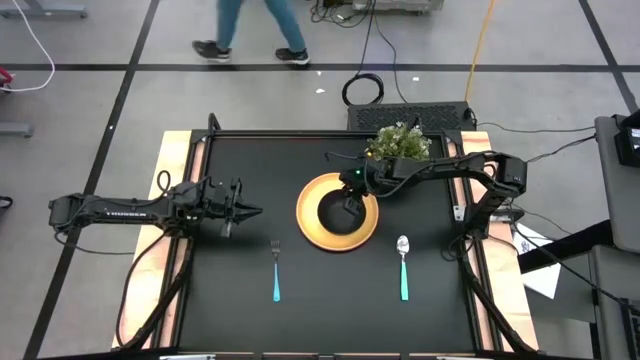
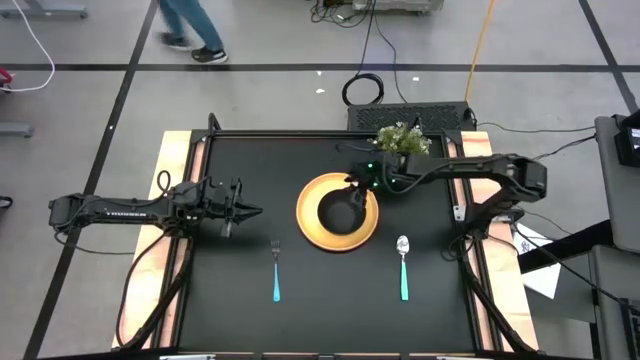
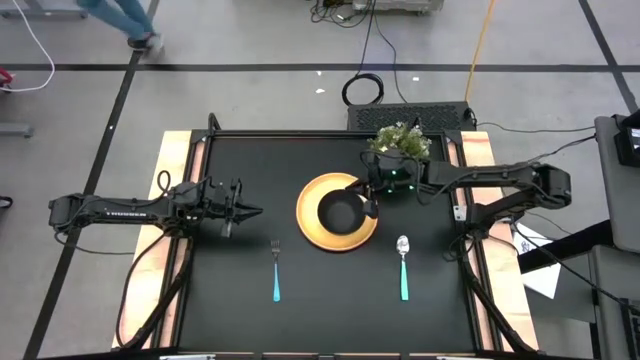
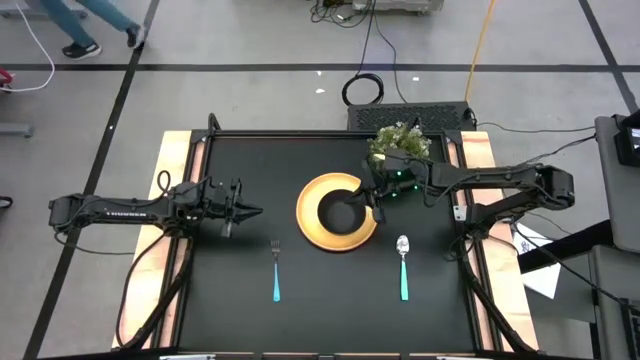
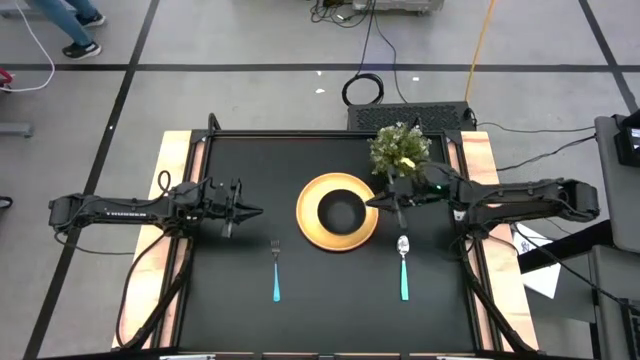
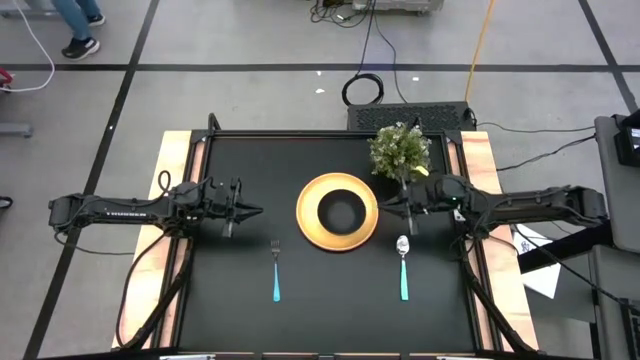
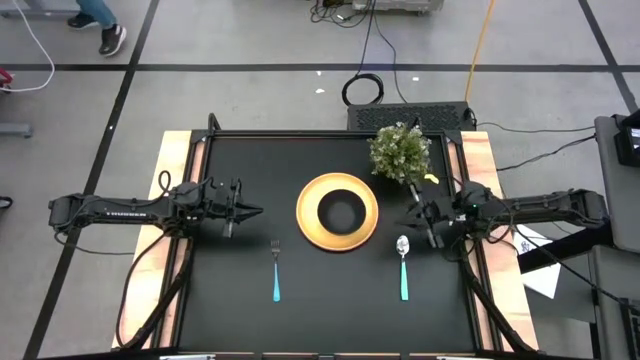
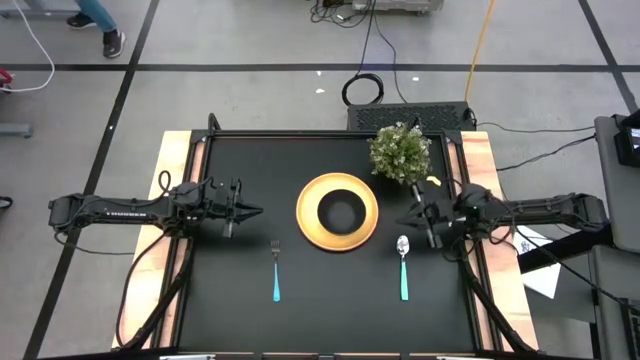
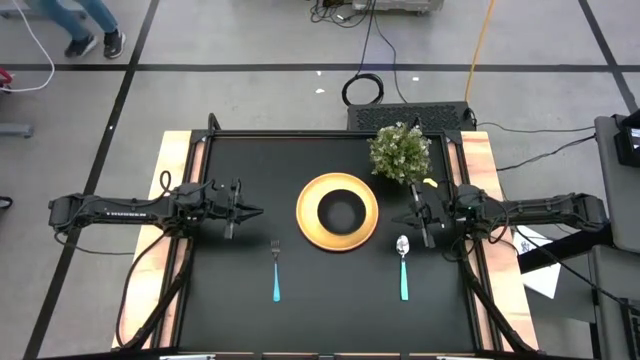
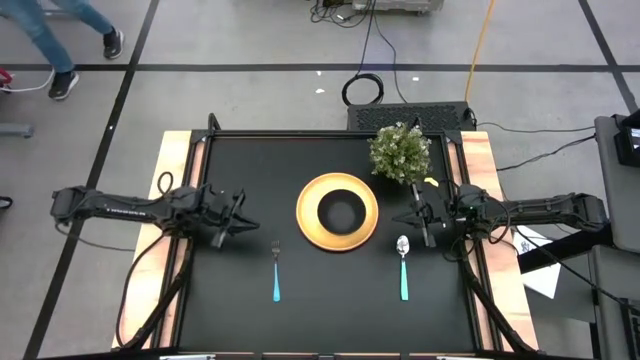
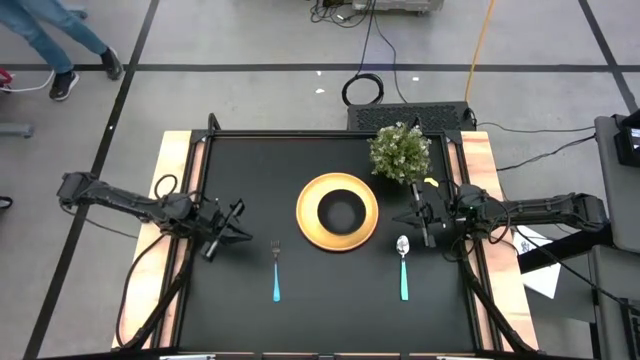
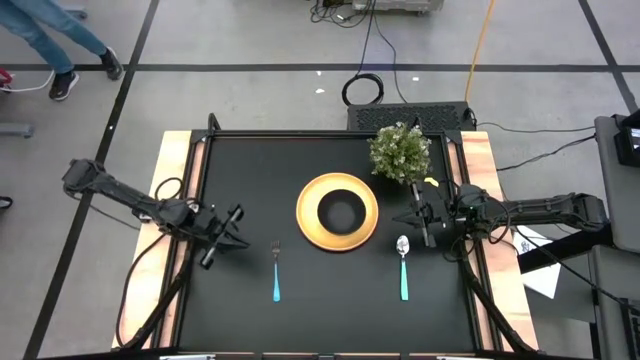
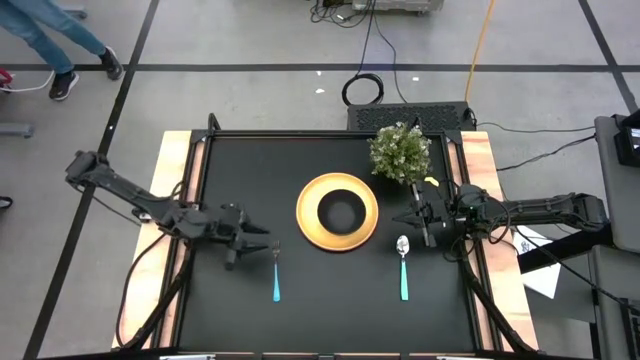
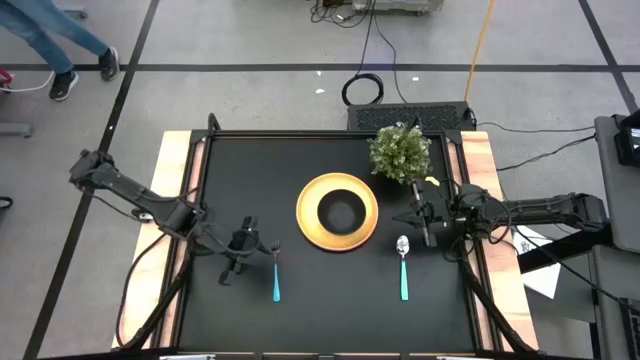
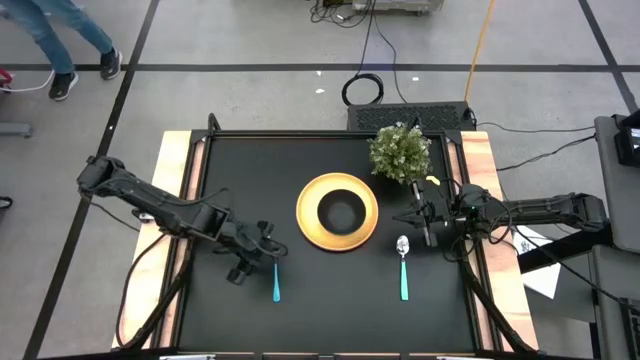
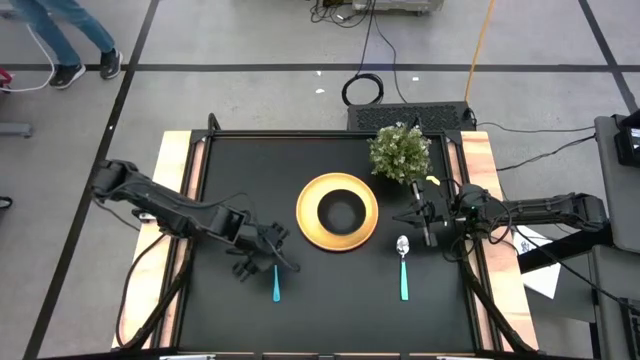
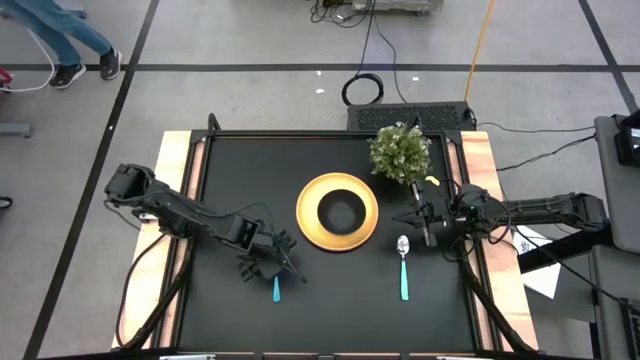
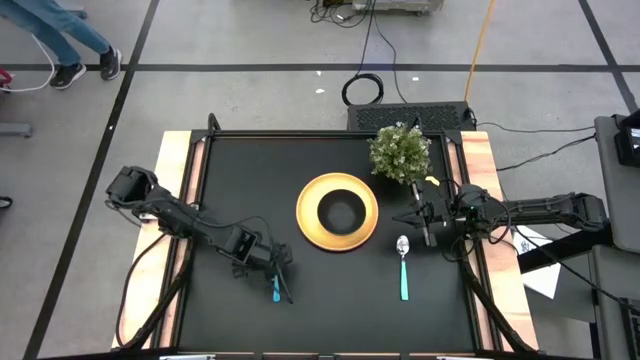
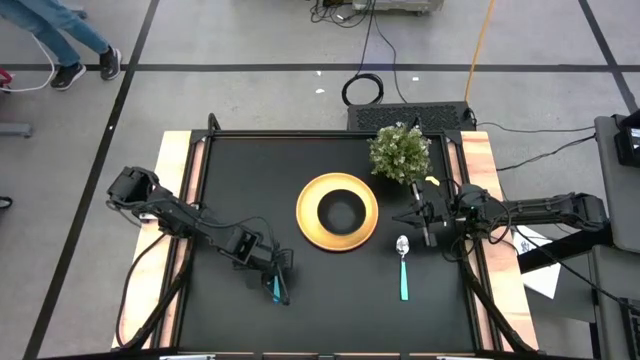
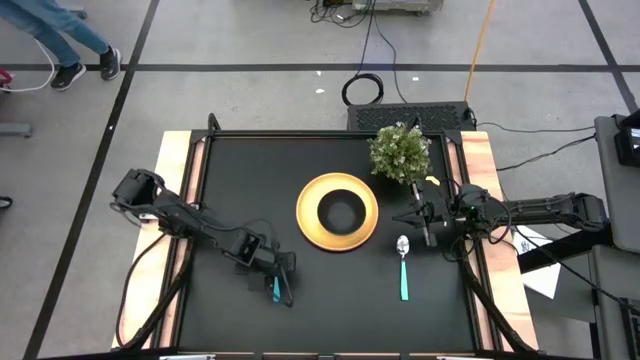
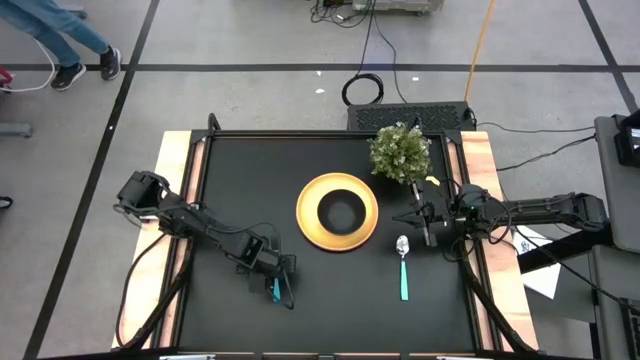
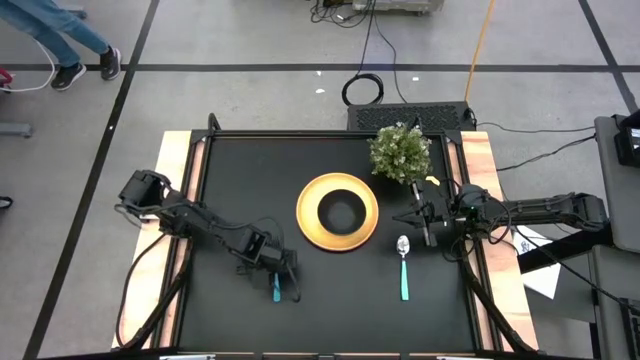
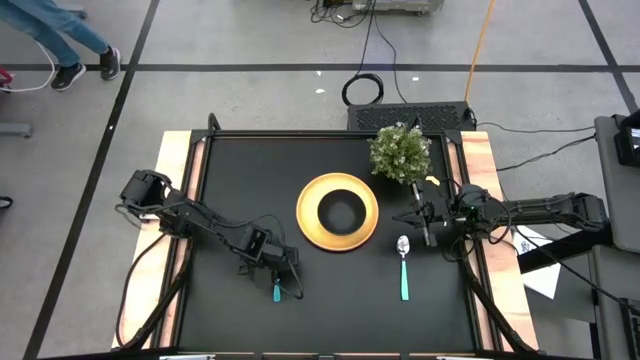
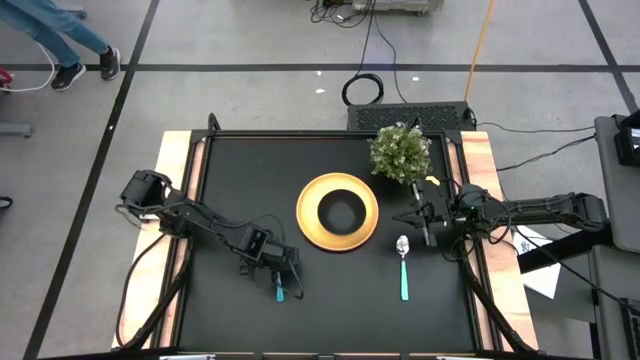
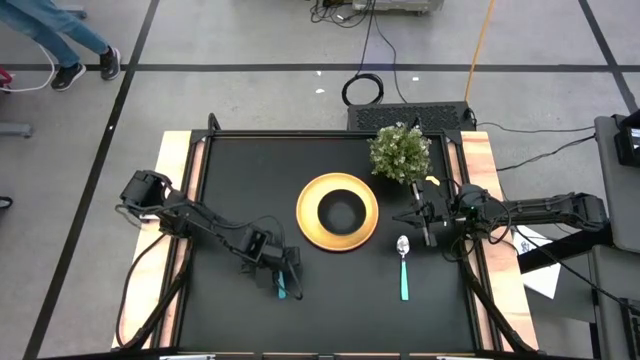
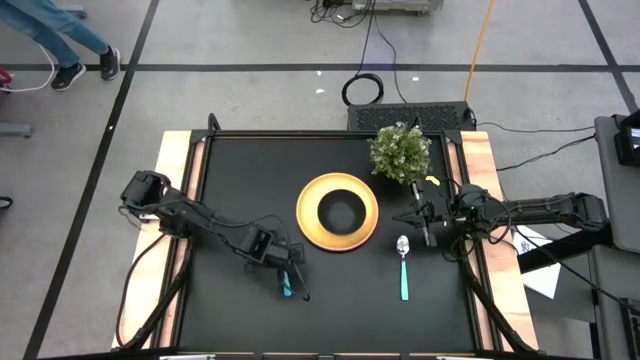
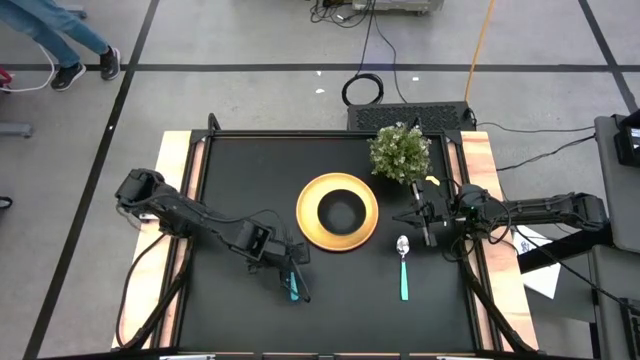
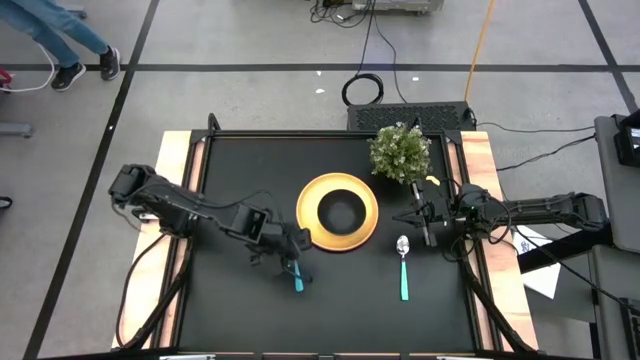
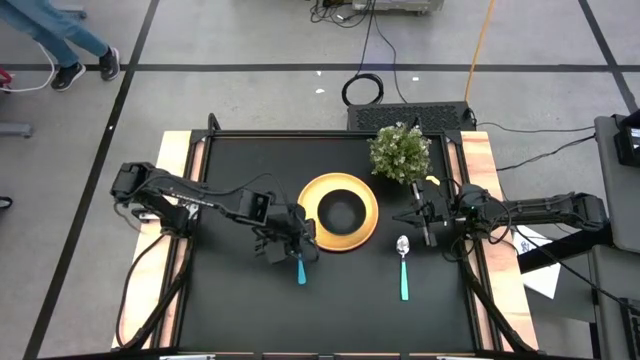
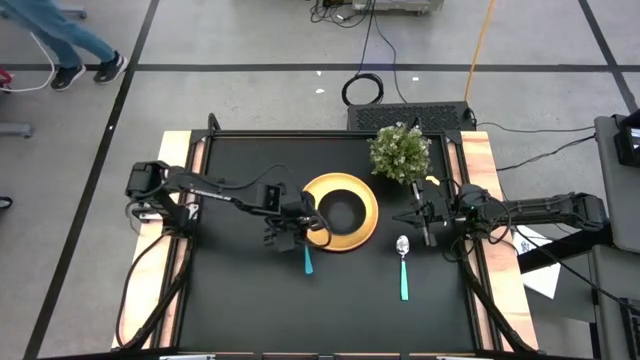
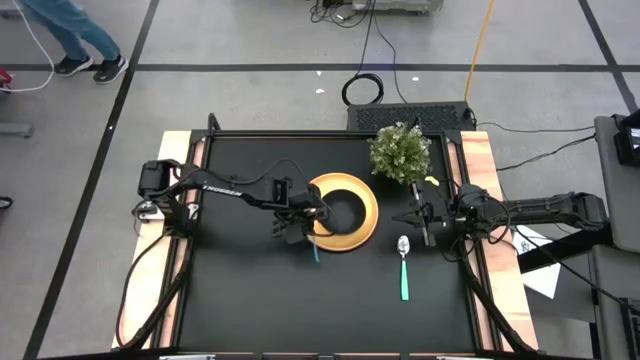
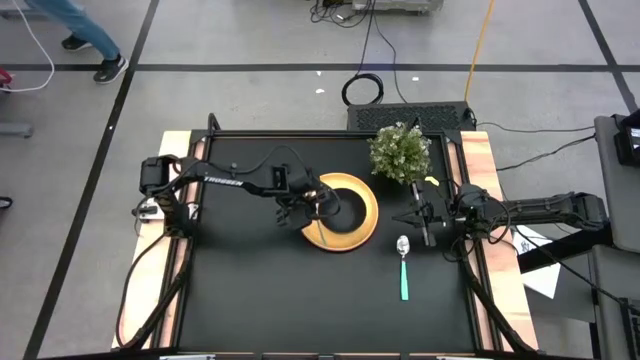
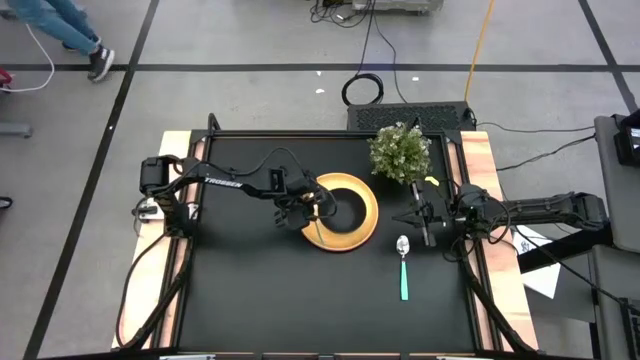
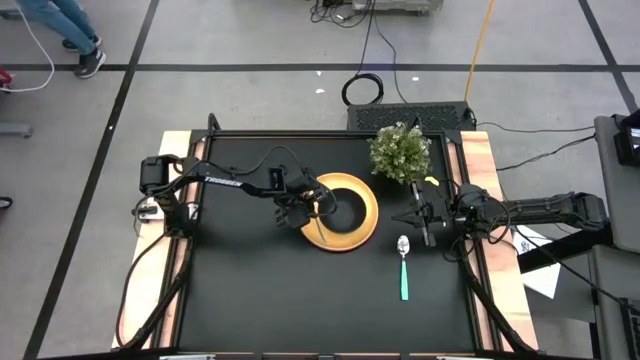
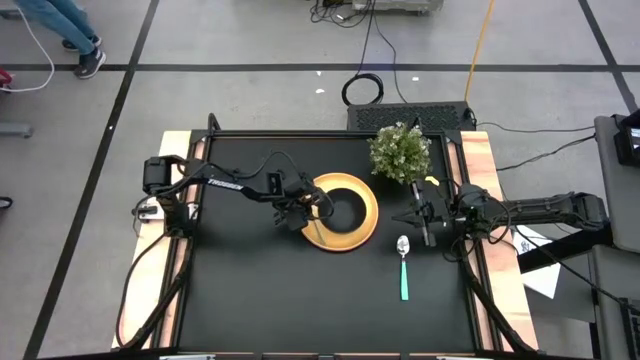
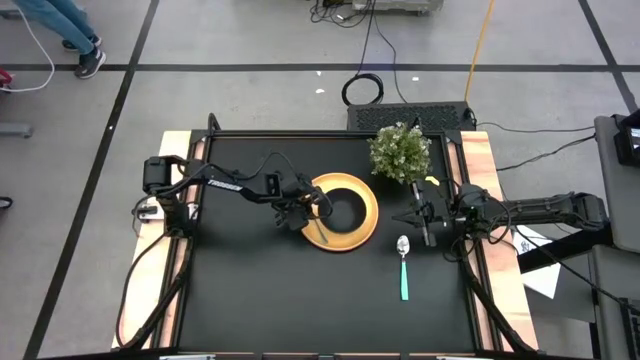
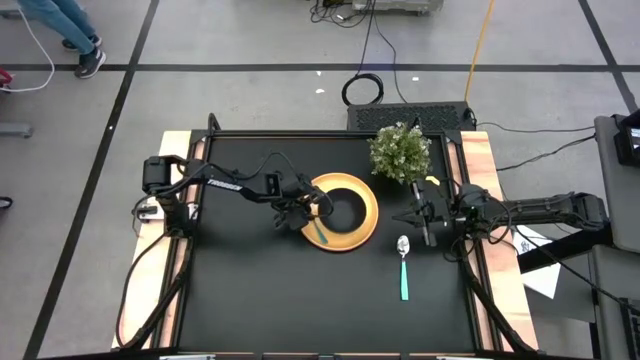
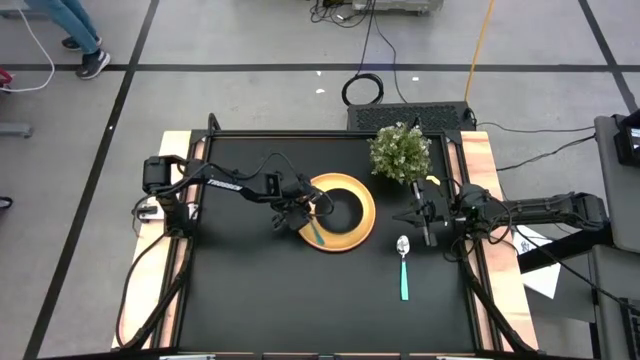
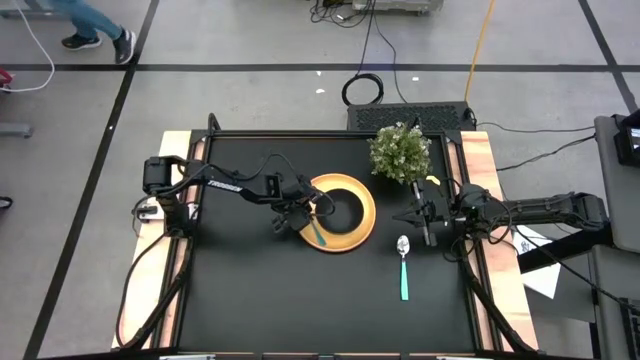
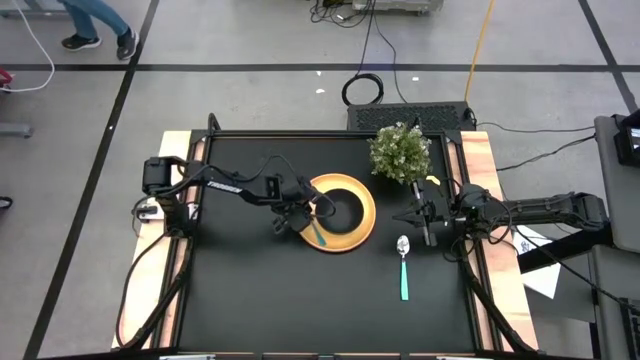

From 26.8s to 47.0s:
Task: Set table place
Put the blue fork on the yellow plate to the left of the black bowl

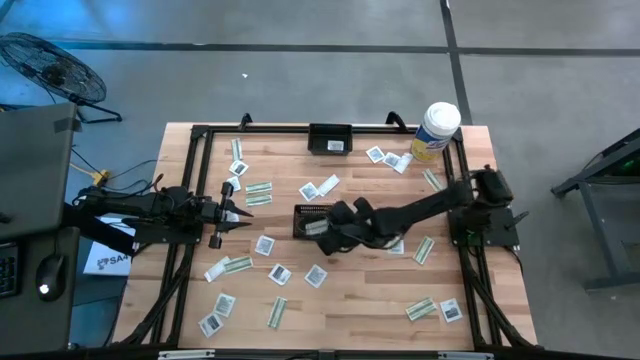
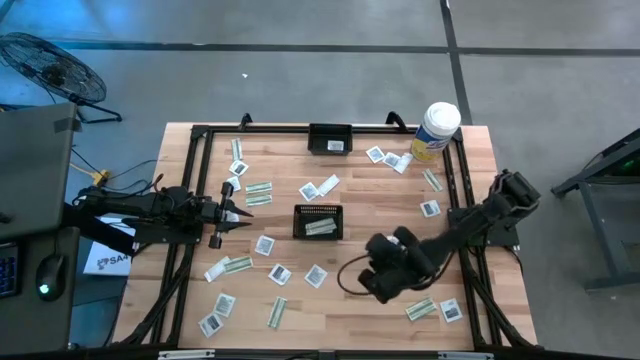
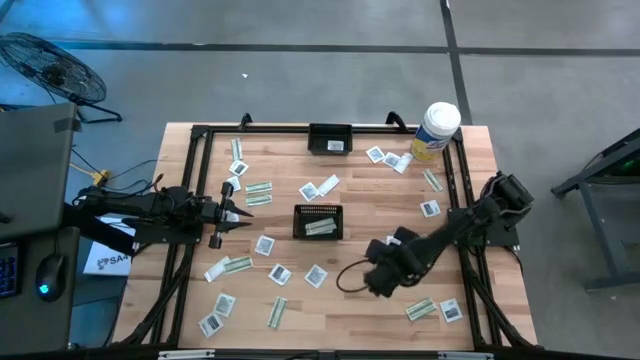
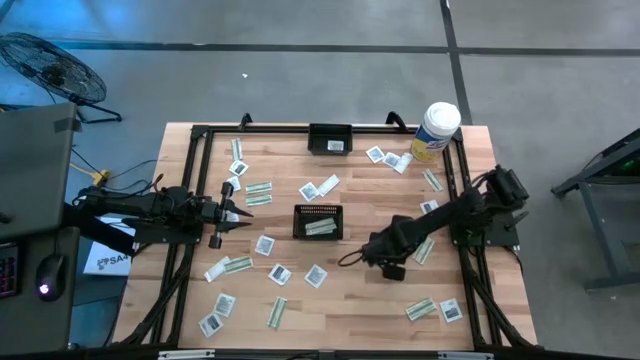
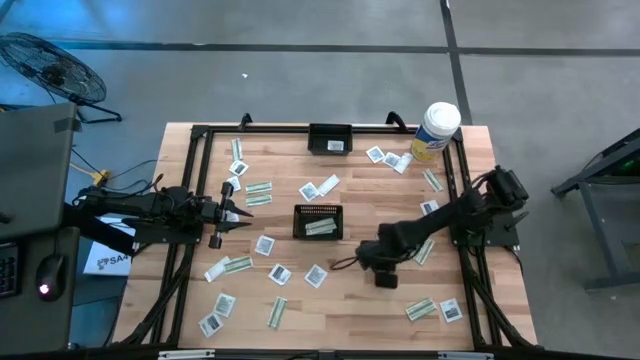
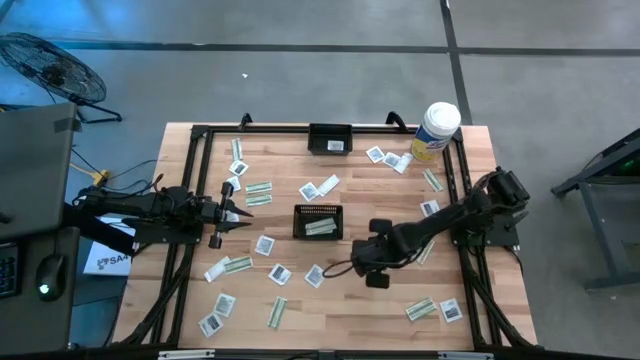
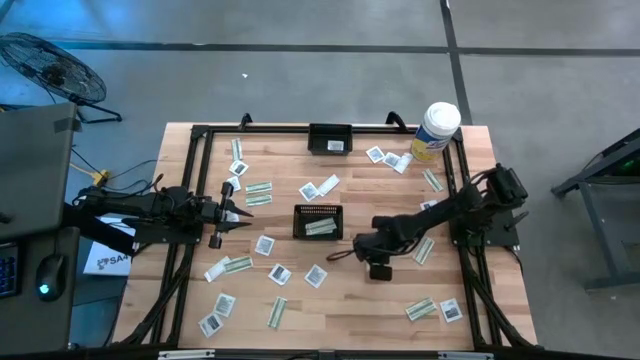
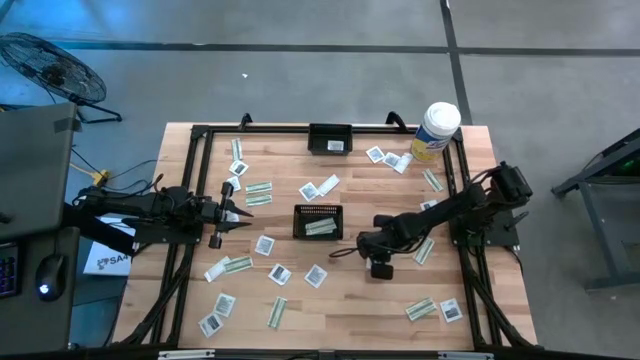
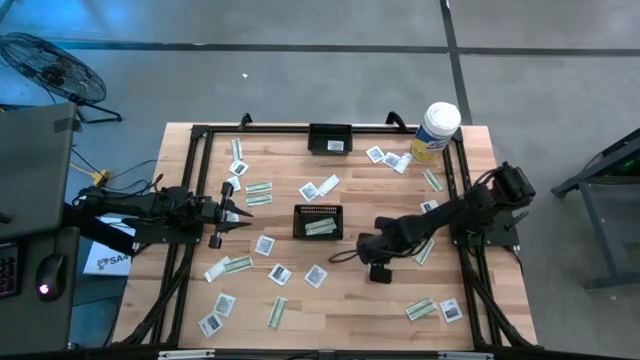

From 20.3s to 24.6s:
Task: Pick & Place First Aid Supplies
Put the towelette pack into the top black basket
